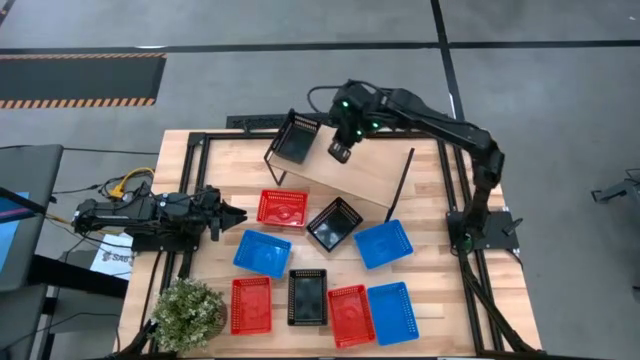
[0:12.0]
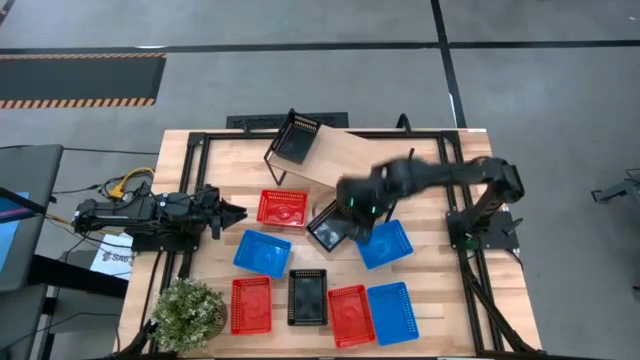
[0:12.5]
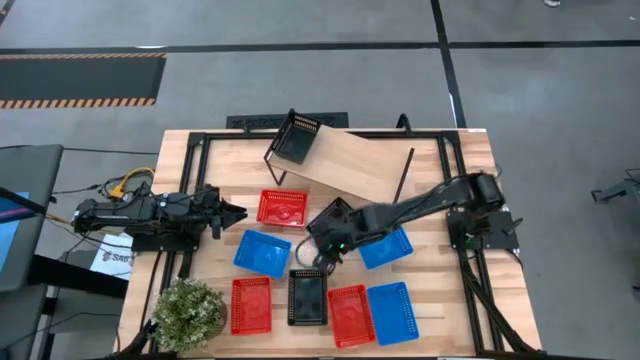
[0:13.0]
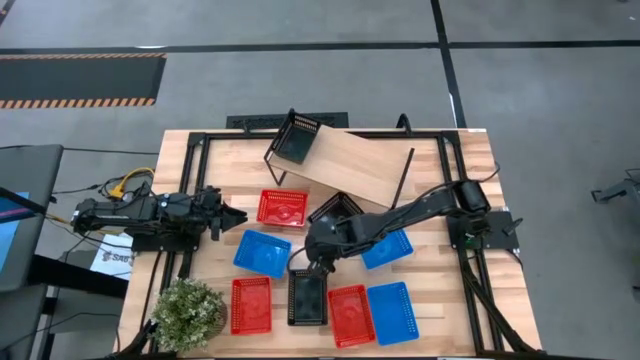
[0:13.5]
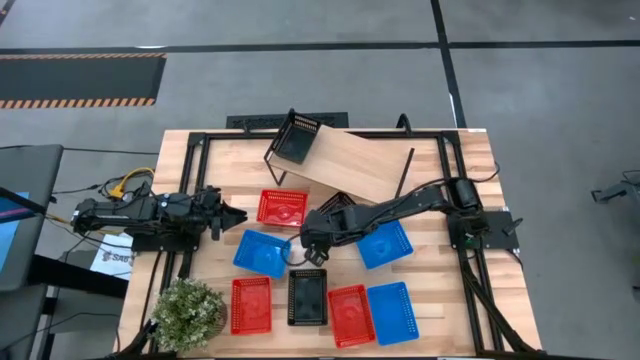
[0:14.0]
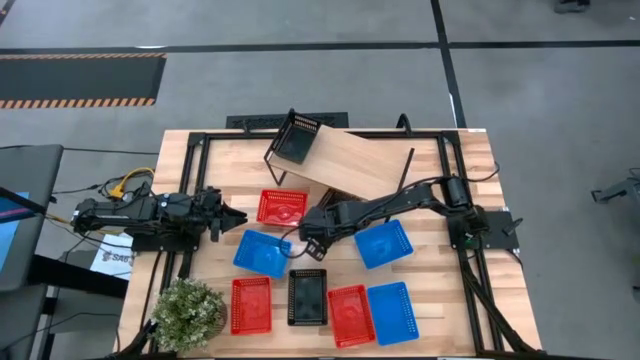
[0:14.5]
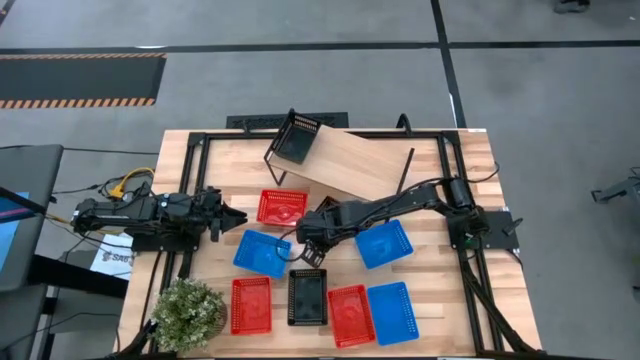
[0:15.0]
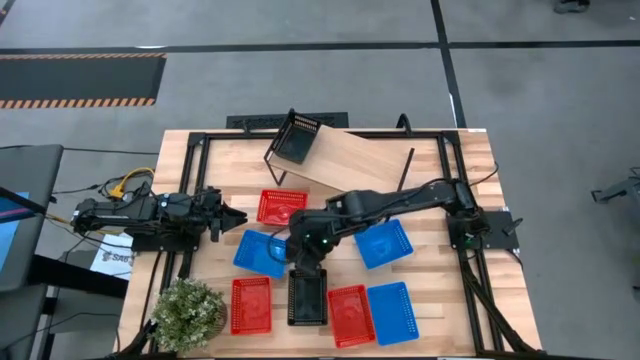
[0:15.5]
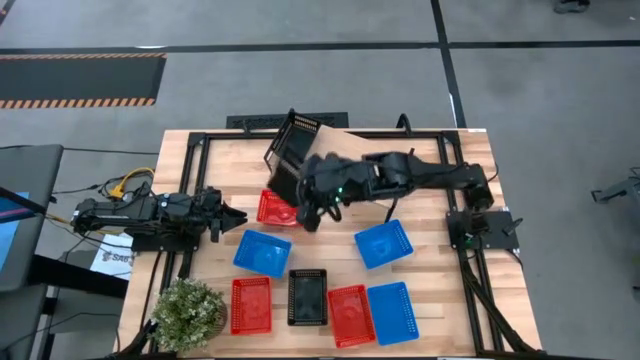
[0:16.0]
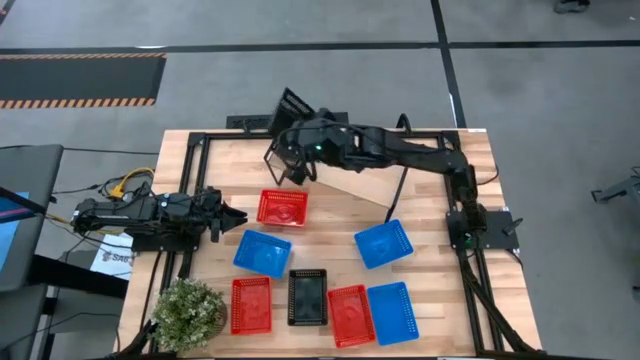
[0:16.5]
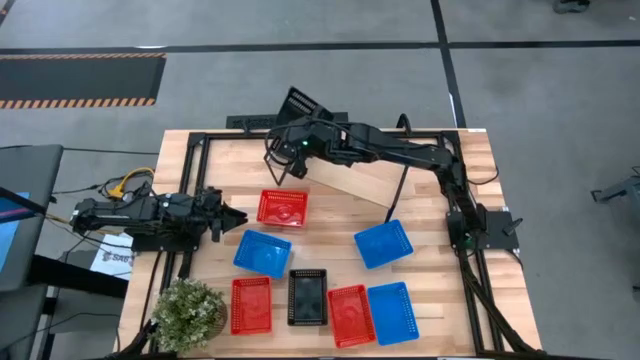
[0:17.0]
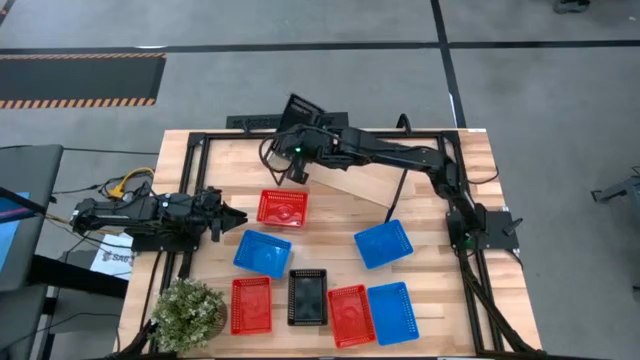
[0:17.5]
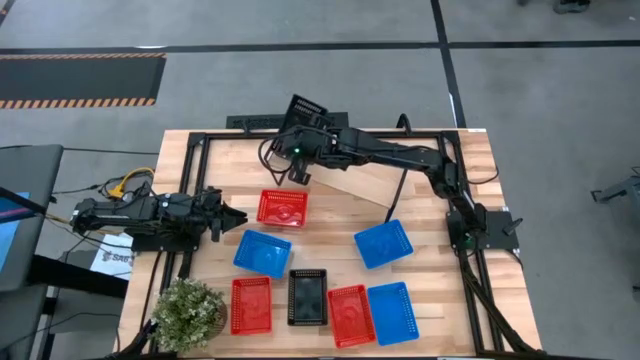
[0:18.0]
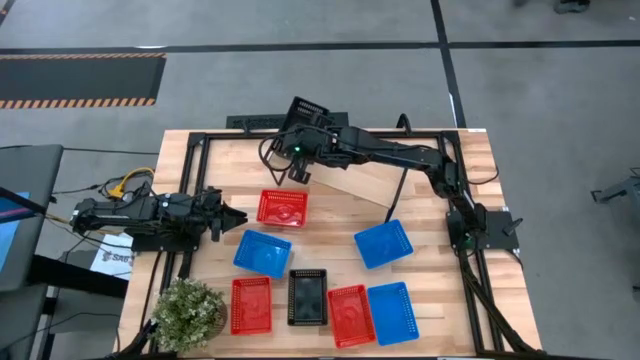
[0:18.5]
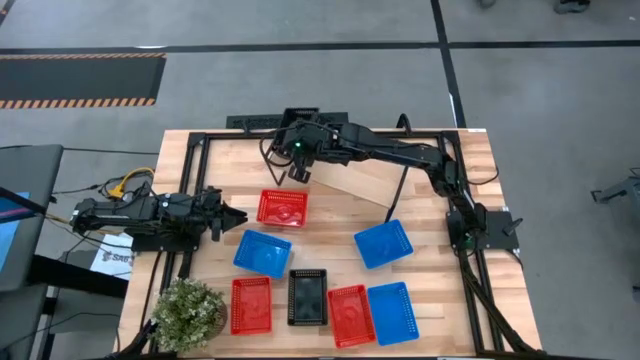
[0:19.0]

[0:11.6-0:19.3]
Task: Stack baskets on shelf by color
Stack the top black bin on the black bin on the shelf

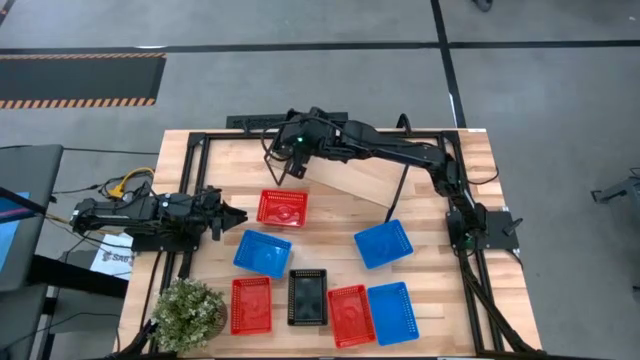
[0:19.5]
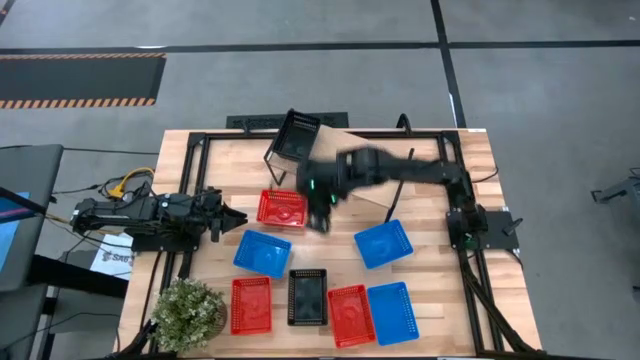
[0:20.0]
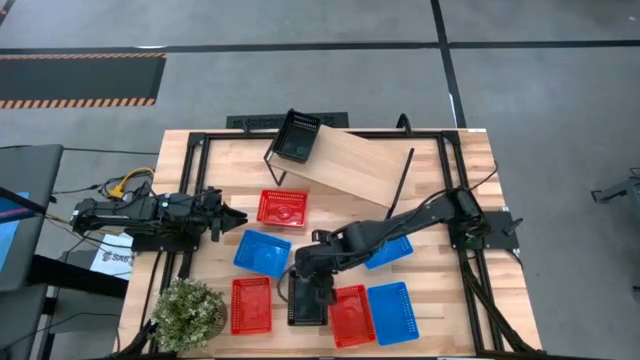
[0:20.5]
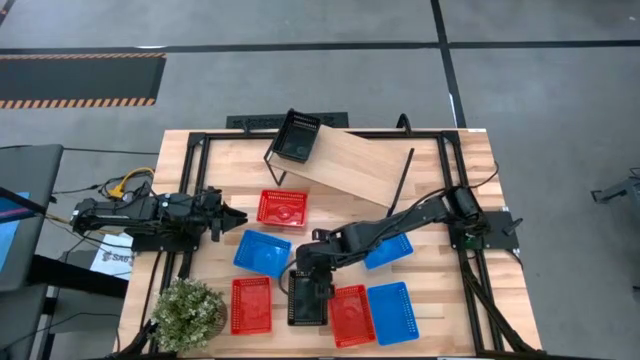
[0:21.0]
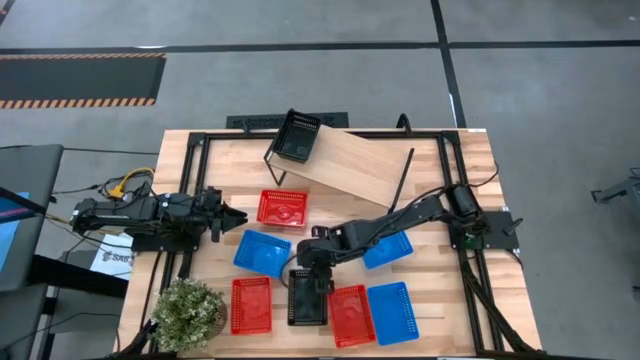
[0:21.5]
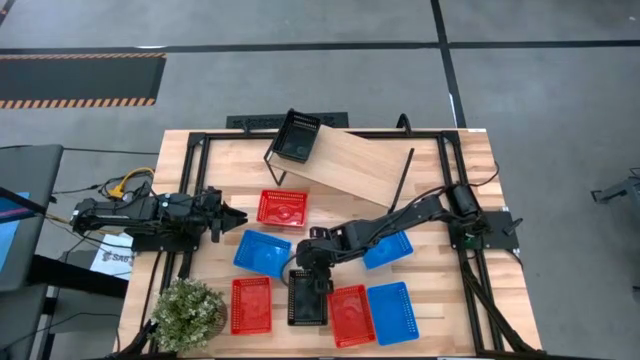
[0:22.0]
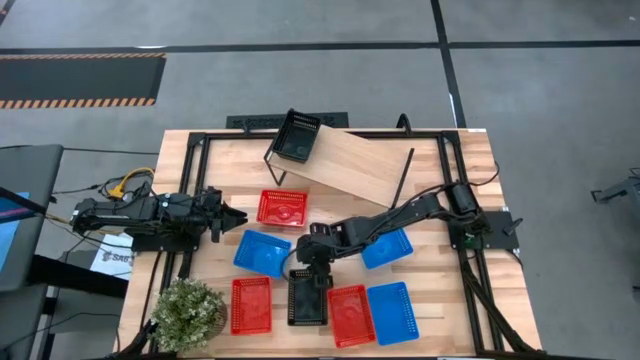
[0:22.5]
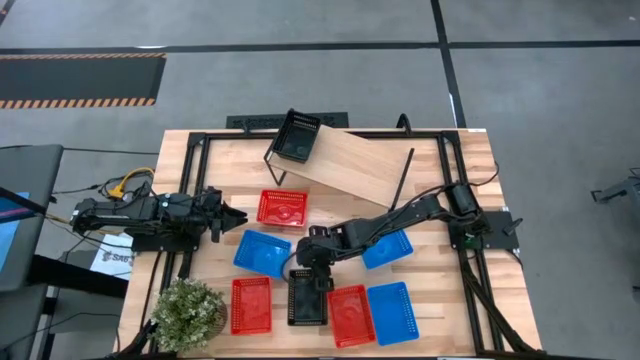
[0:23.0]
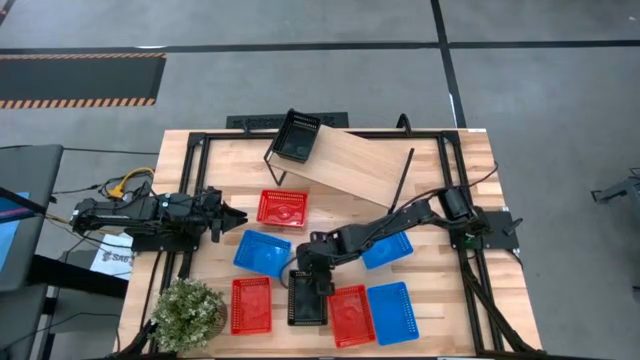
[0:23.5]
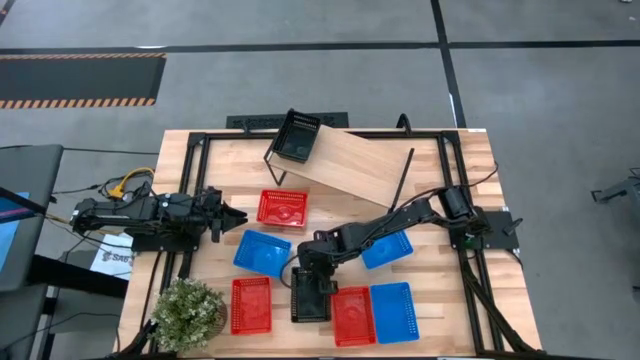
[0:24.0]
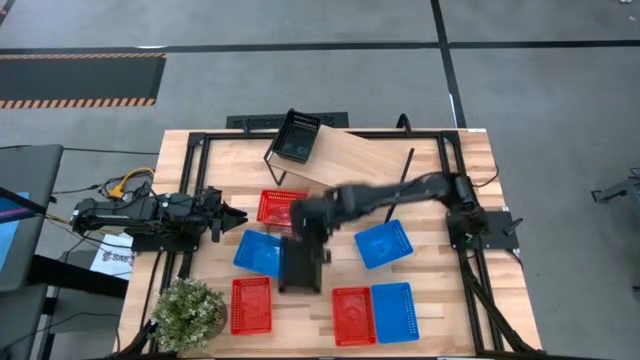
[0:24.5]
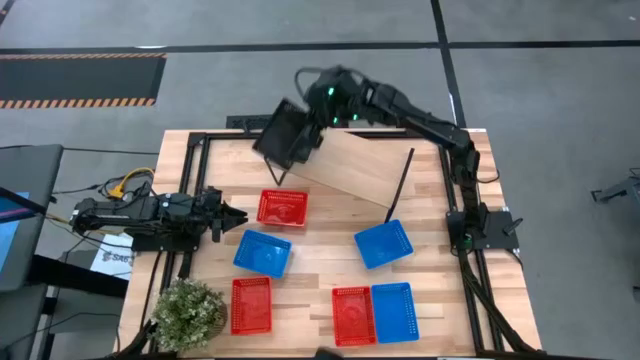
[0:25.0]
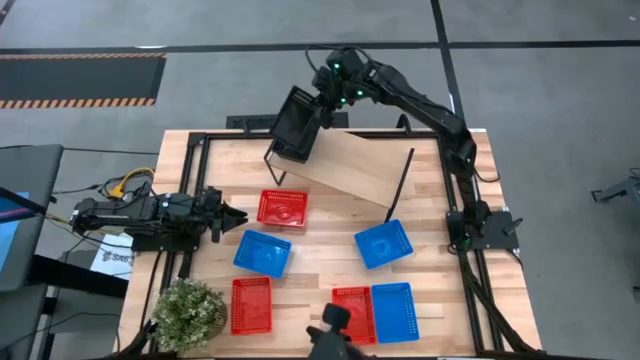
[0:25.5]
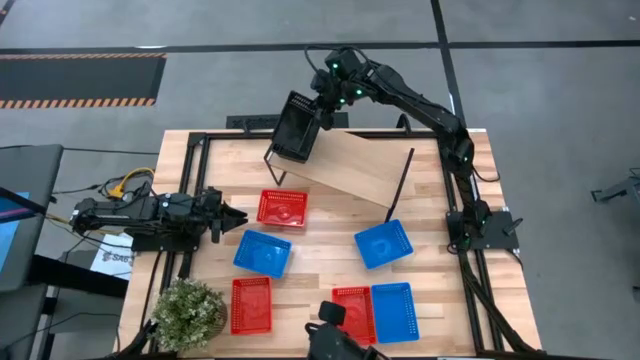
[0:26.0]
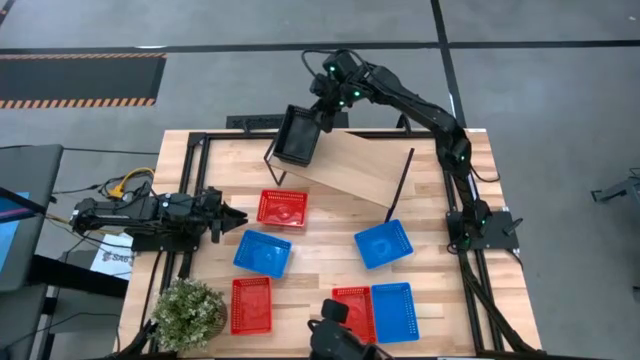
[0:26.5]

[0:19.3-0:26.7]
Stack the black bin on the black bins on the shelf

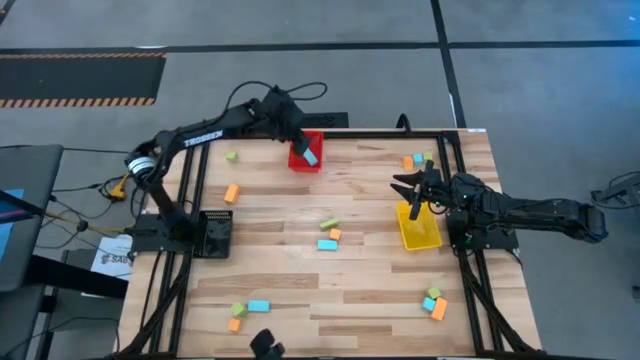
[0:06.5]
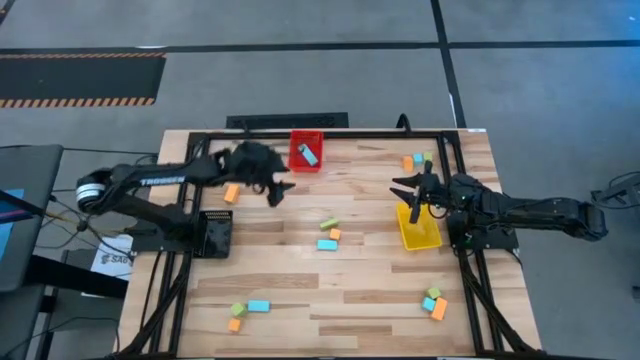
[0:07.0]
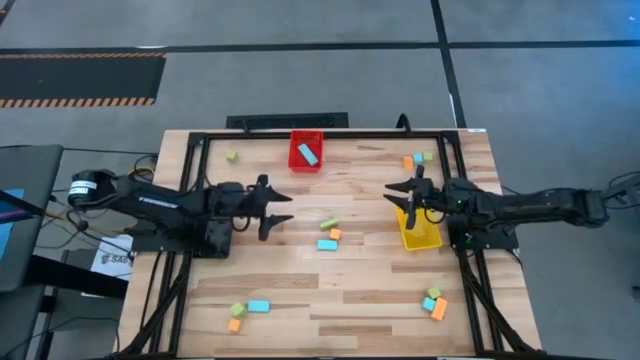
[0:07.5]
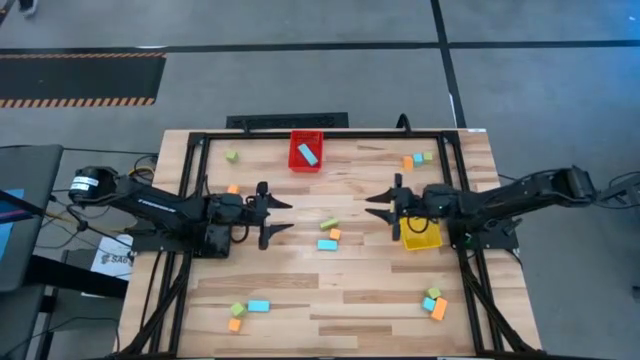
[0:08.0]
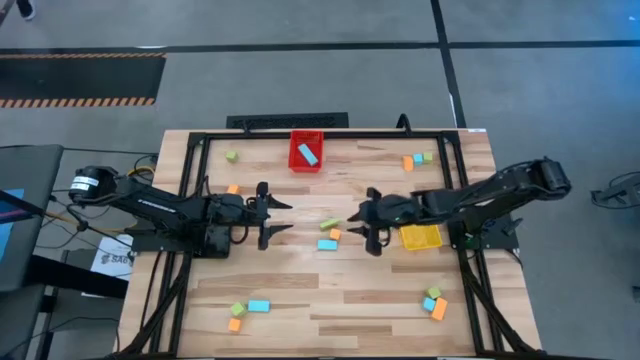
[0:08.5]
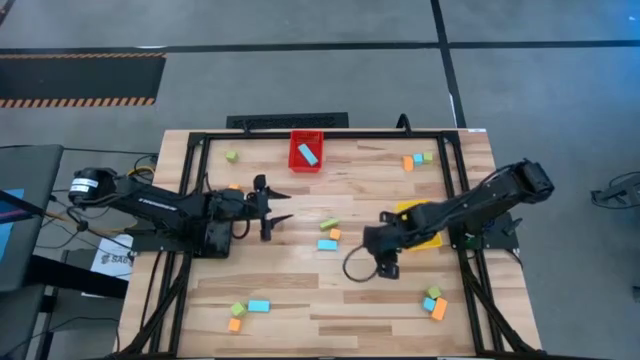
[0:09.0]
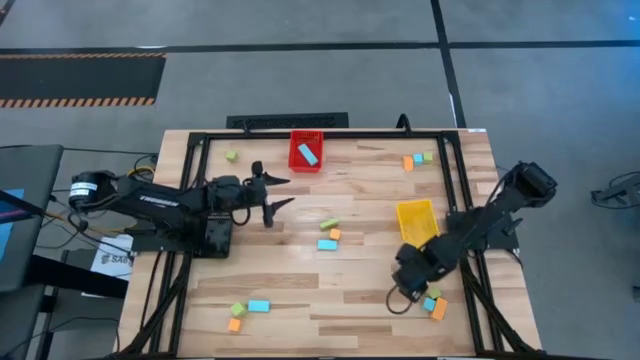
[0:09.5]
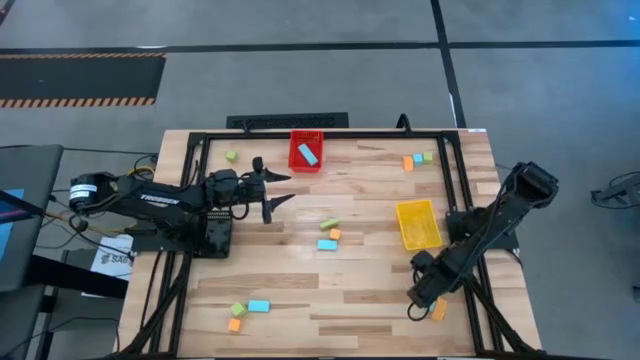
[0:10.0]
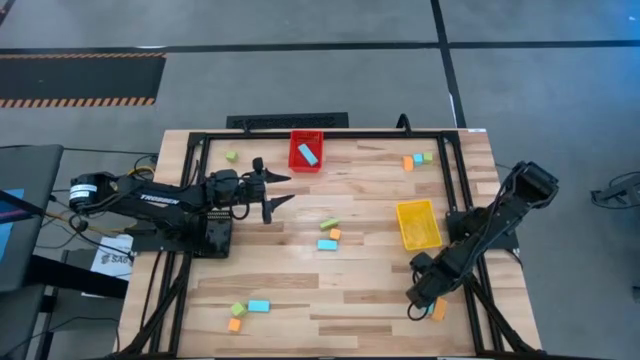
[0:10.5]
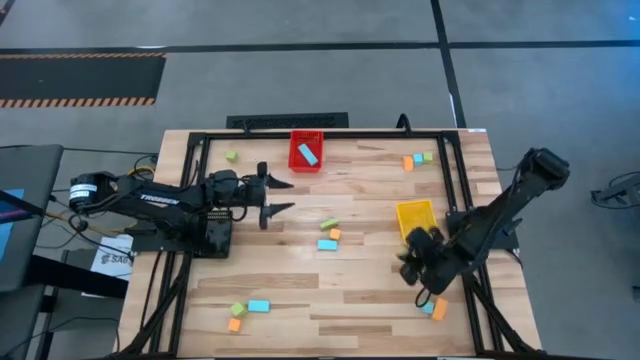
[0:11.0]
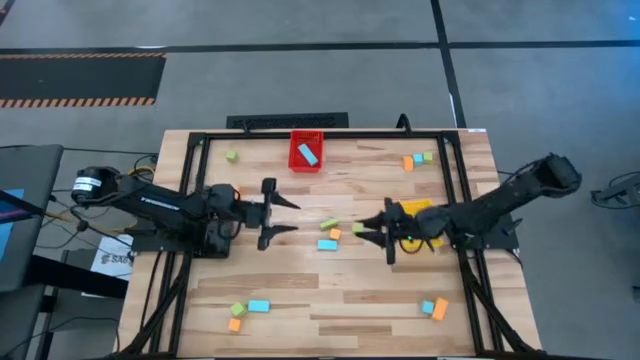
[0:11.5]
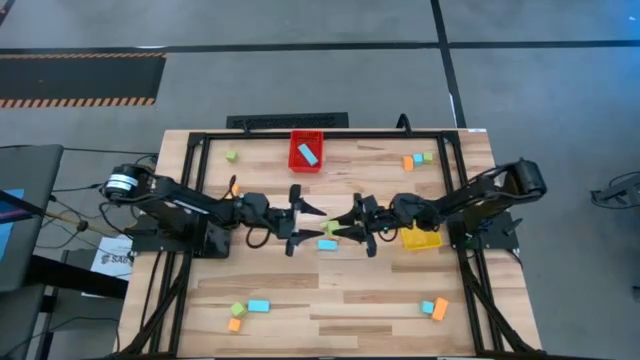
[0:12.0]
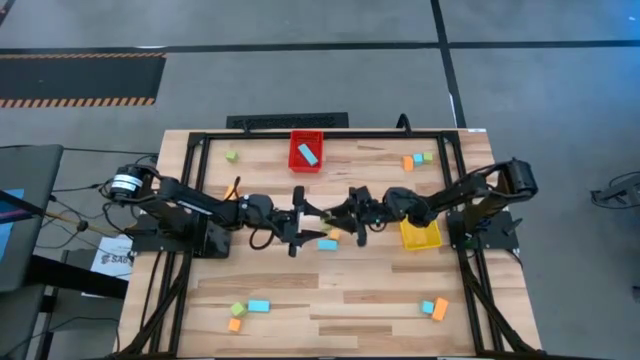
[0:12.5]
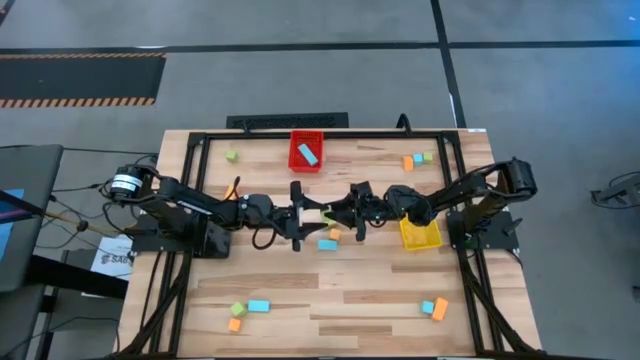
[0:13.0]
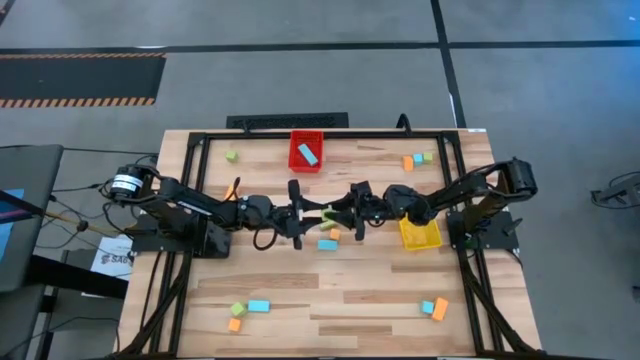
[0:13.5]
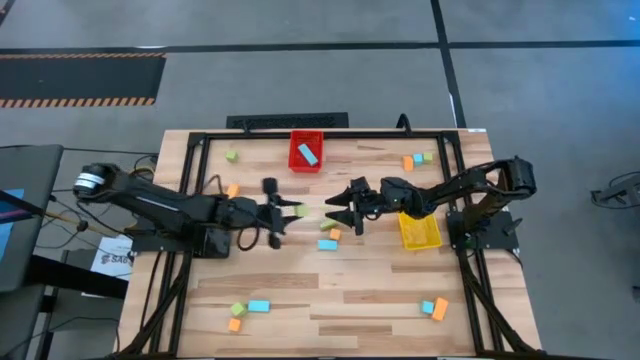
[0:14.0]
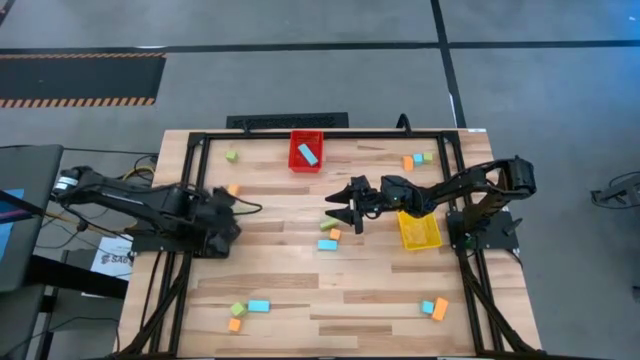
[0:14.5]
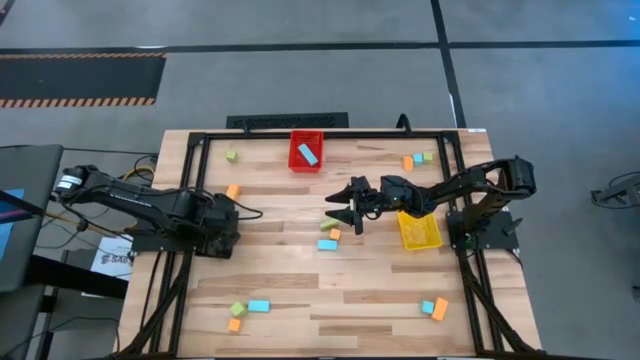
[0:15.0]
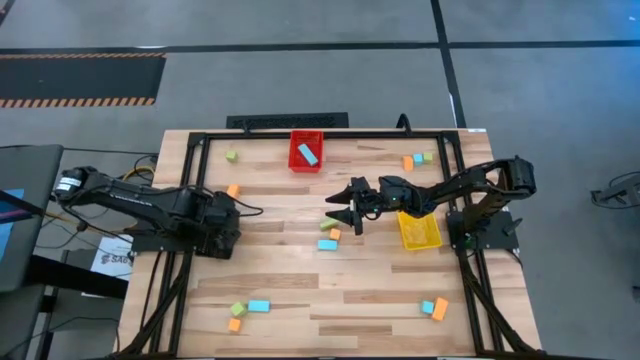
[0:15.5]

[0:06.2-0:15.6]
Task: Sort & place blocks by color
Put the light green block into the black bin
